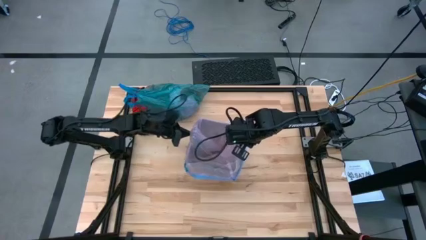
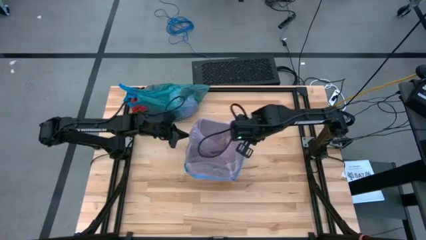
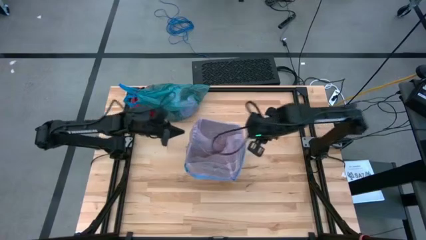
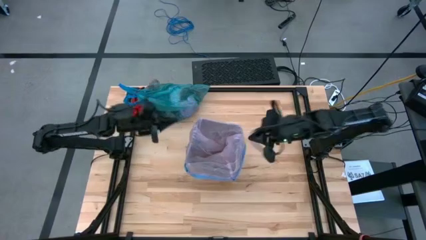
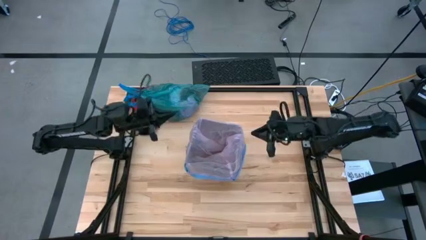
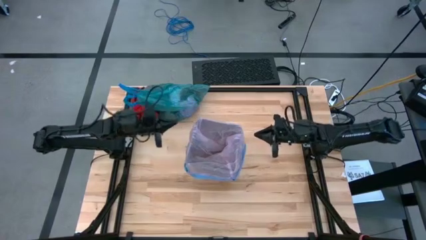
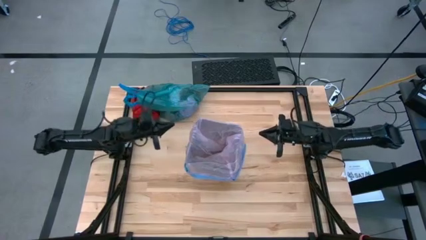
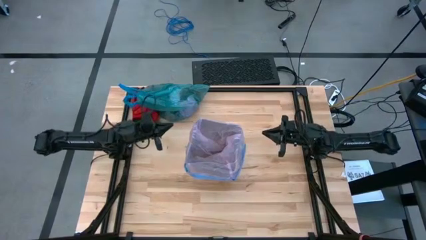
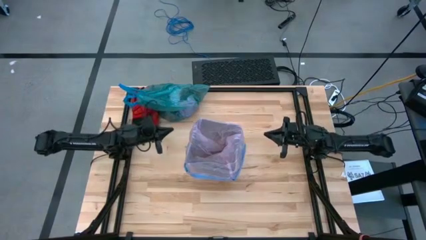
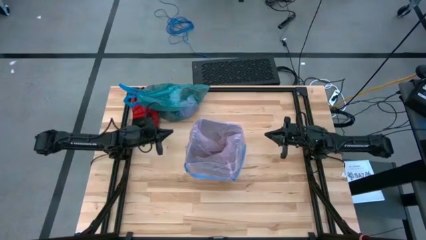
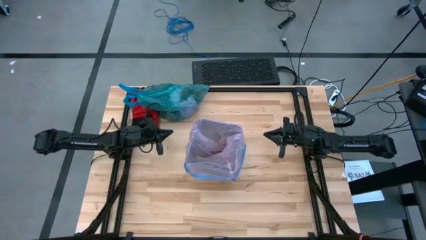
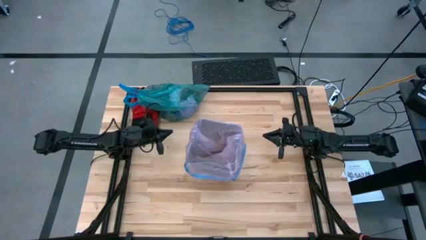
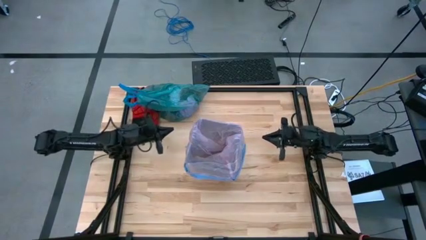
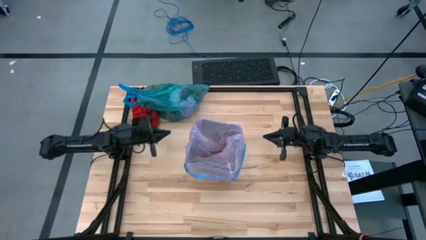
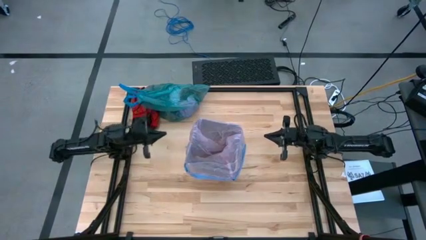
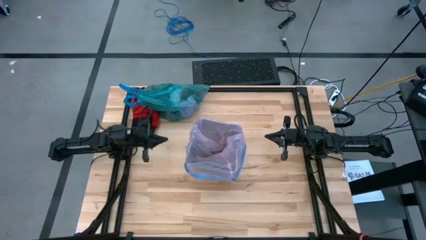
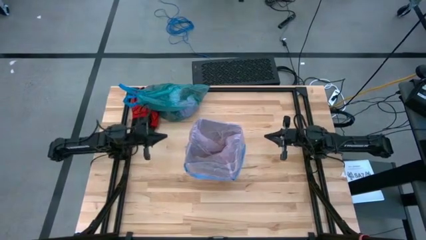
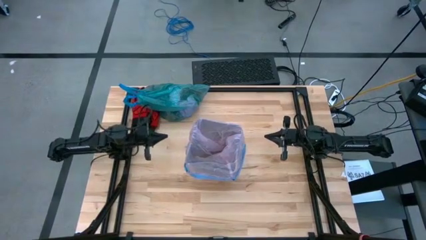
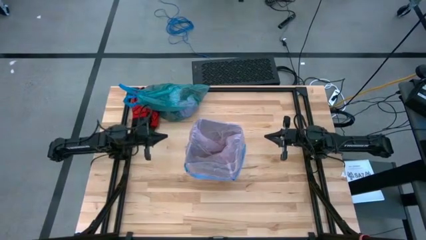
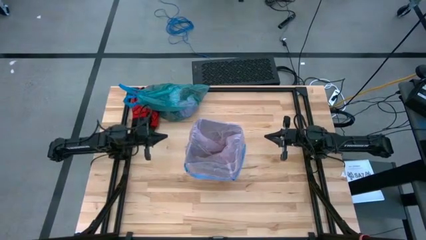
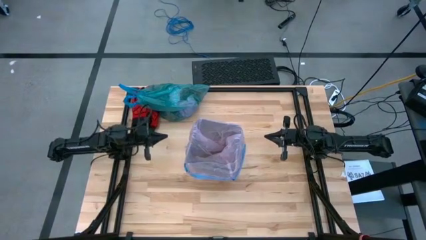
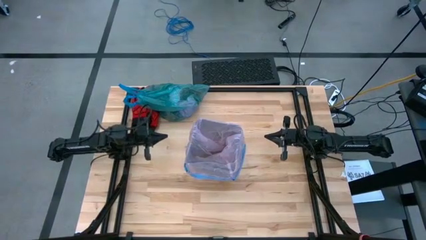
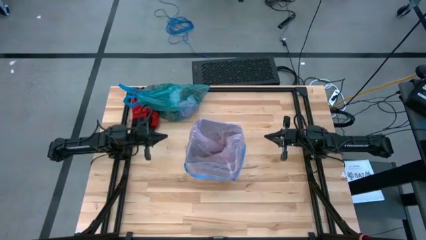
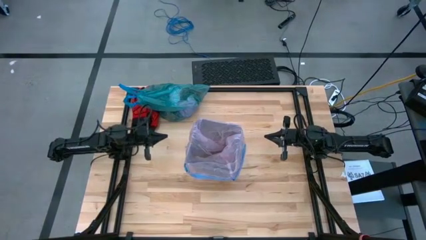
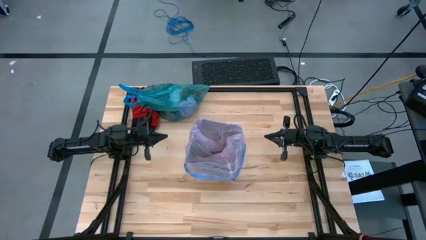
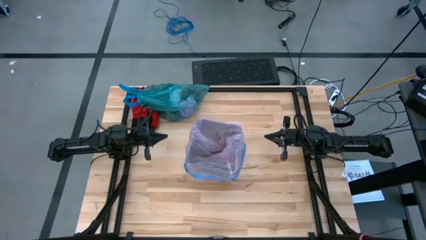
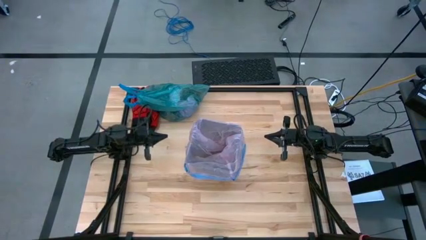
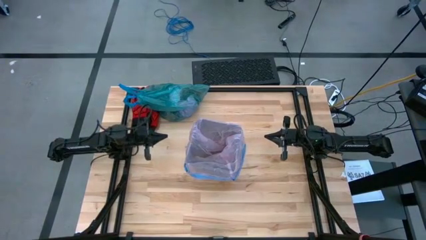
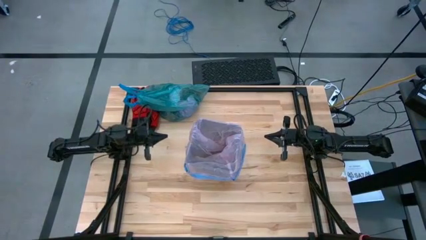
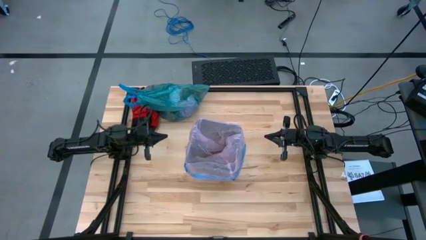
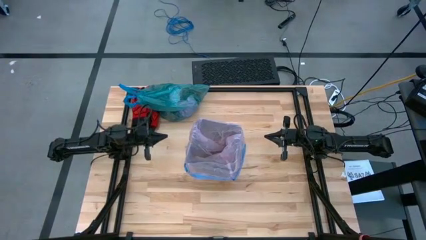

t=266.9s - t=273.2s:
Task: place trash/remove bag and relplace
Return to Home Position

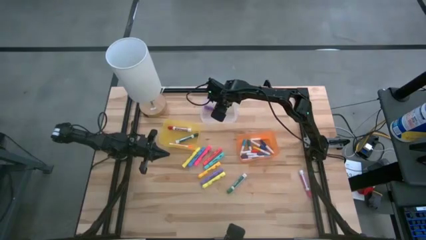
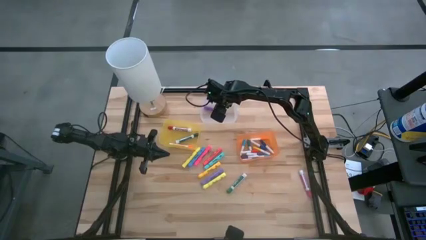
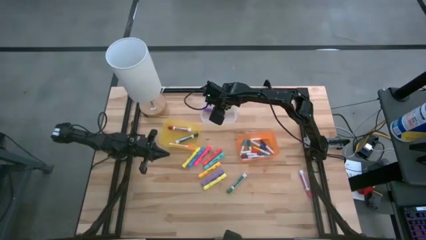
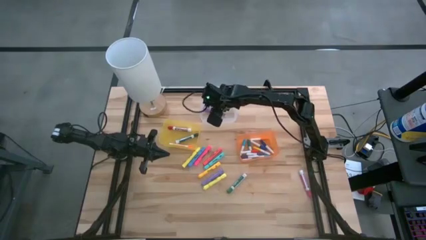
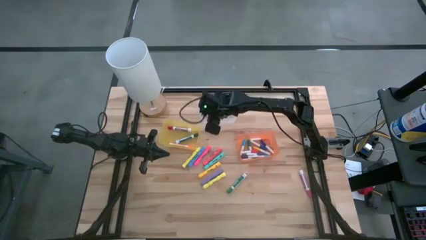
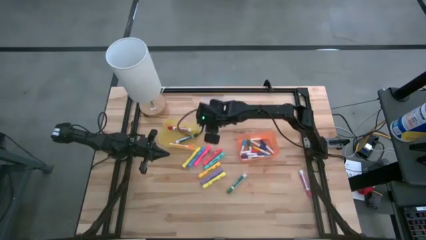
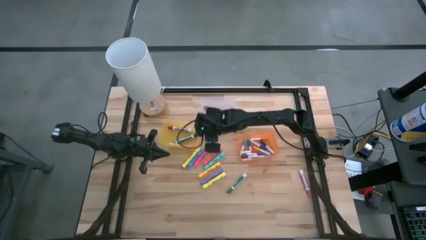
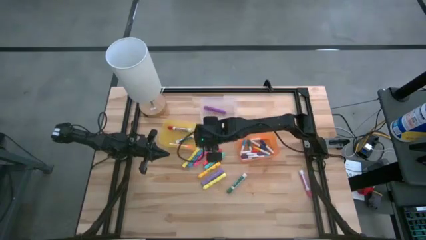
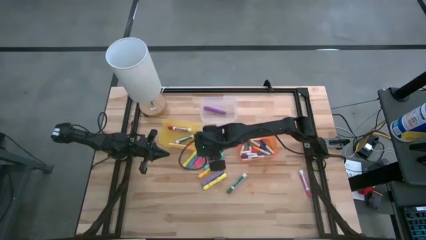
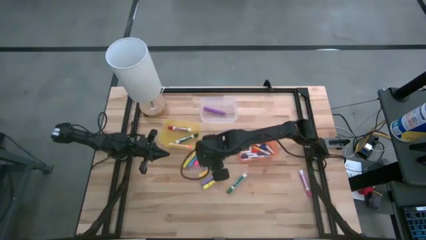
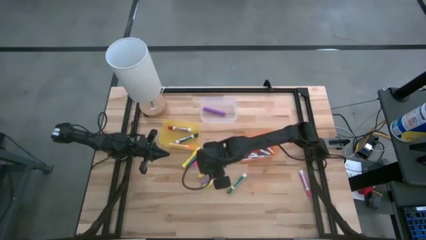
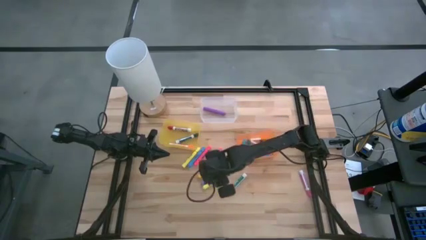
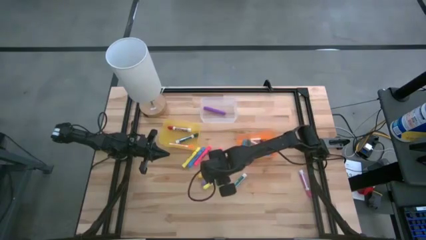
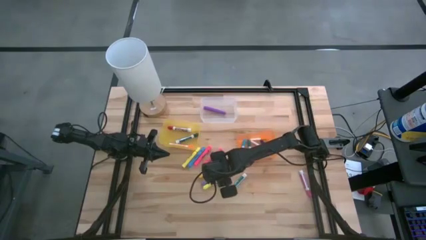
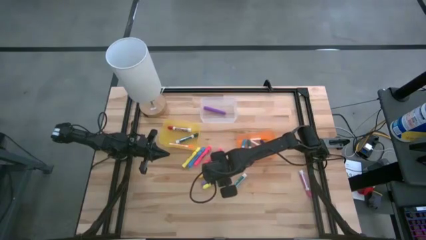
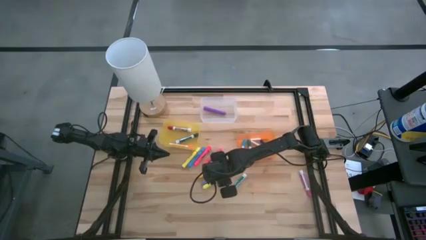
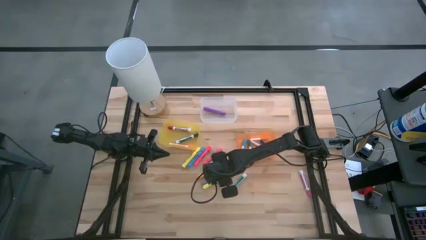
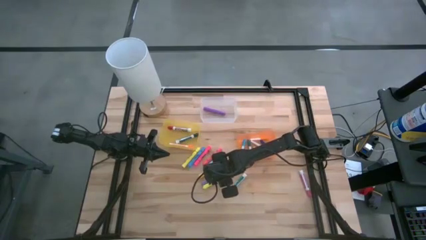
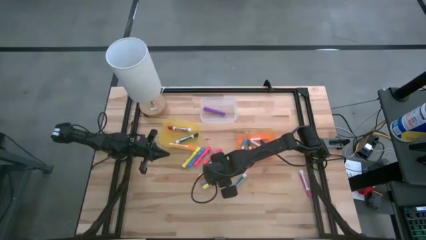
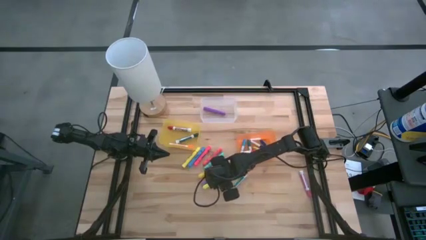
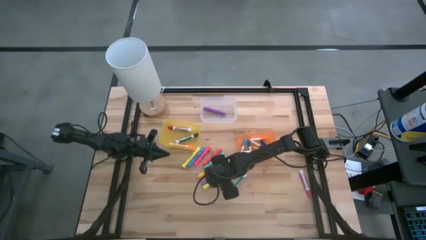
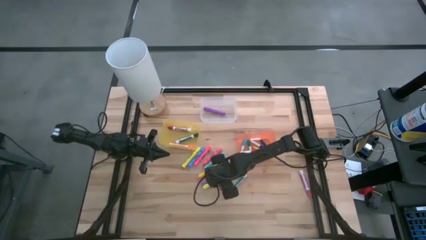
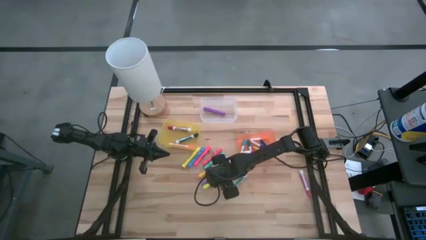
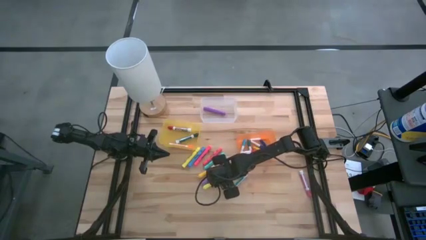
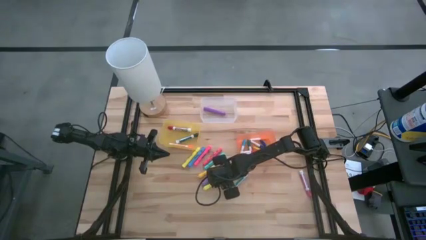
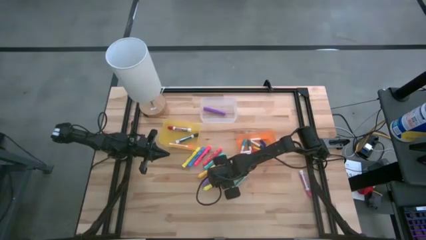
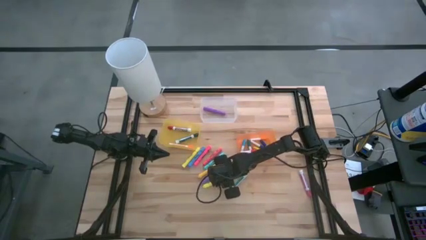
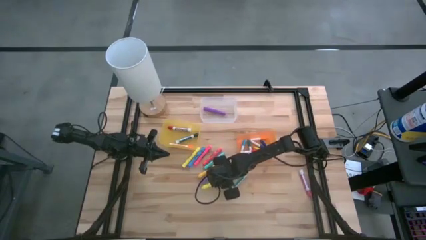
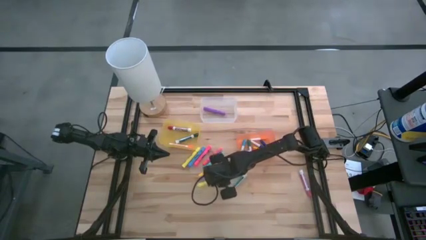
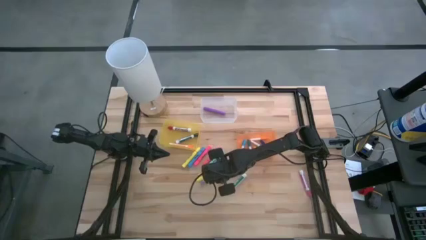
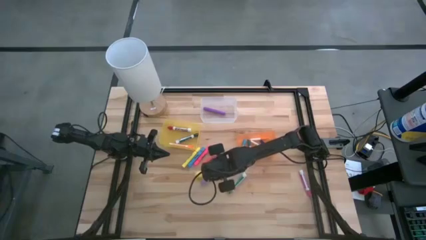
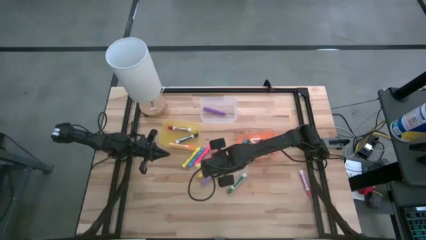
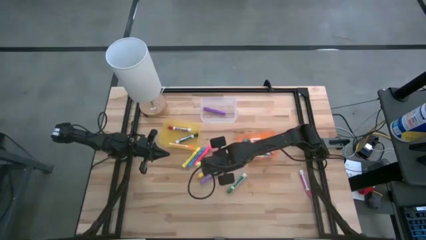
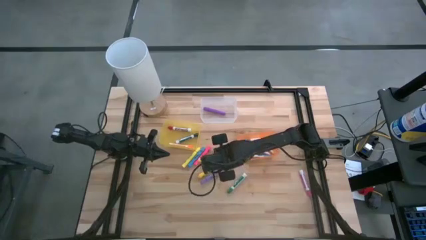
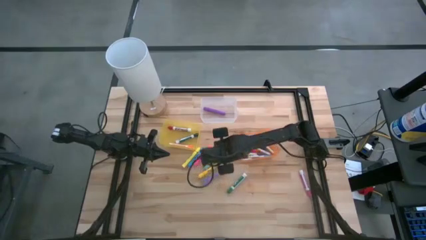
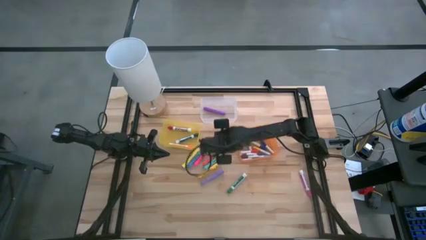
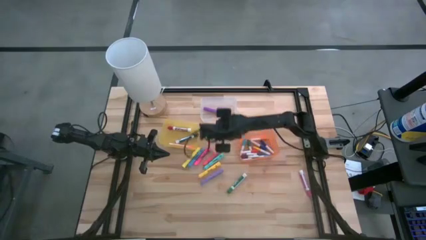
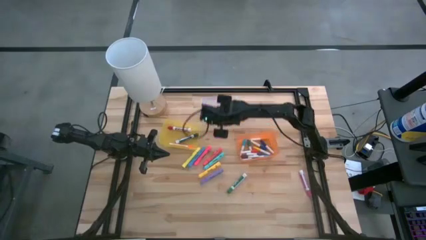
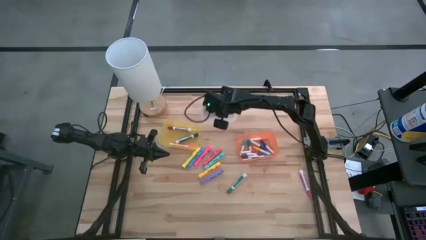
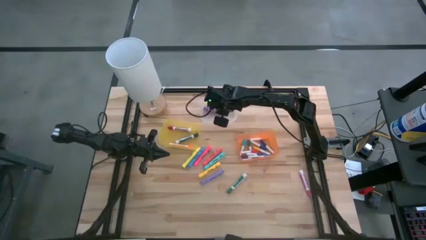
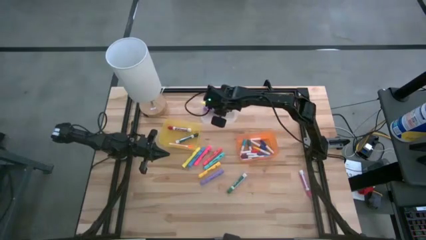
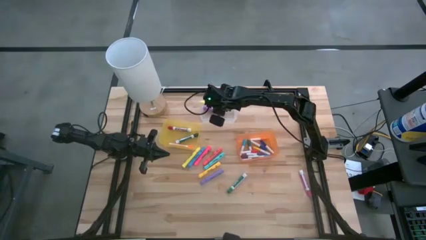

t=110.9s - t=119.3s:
Task: Pick & Place Markers
Put the bottom large yellow highlighter pen into the transparent bin
